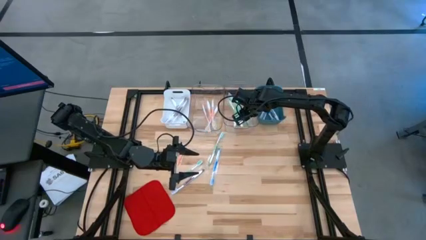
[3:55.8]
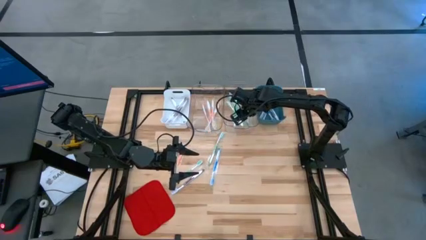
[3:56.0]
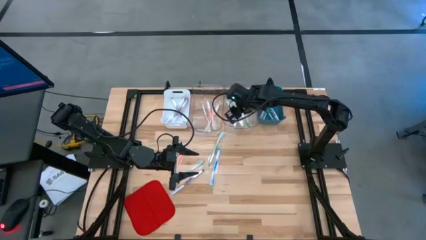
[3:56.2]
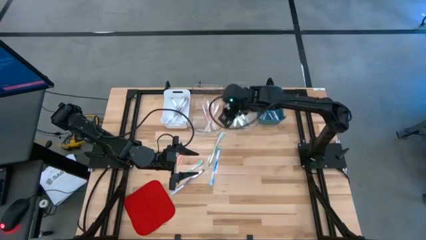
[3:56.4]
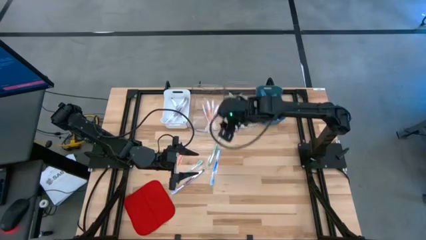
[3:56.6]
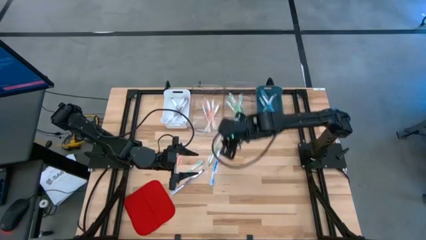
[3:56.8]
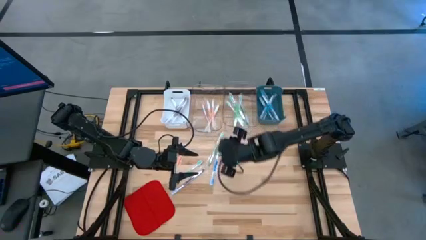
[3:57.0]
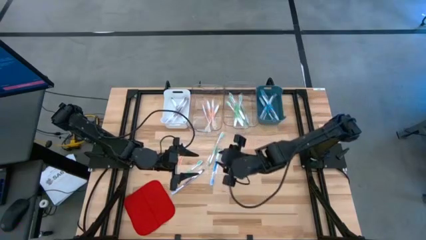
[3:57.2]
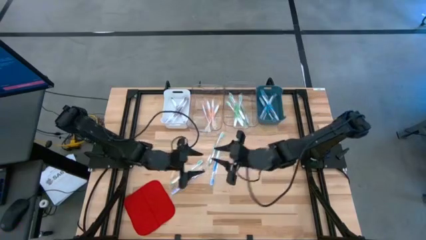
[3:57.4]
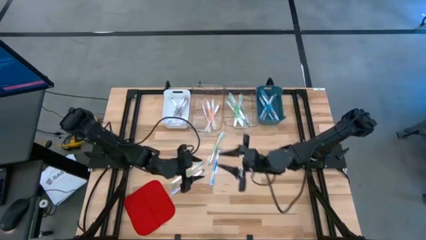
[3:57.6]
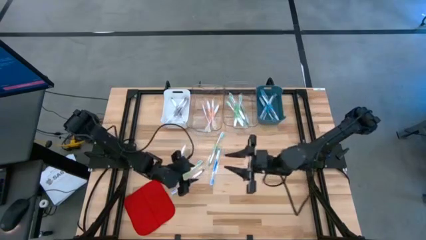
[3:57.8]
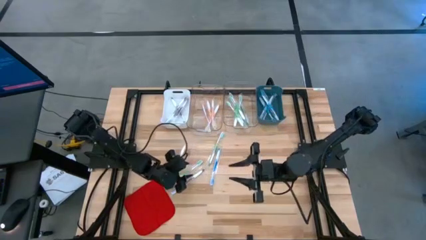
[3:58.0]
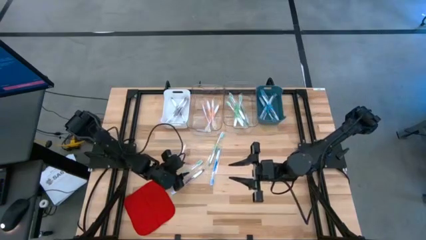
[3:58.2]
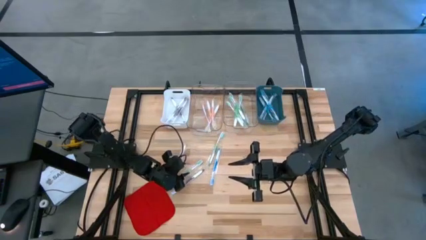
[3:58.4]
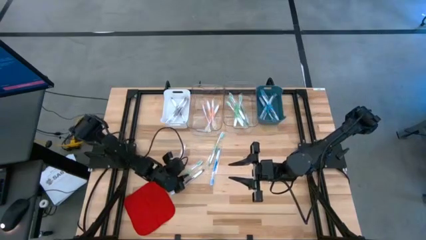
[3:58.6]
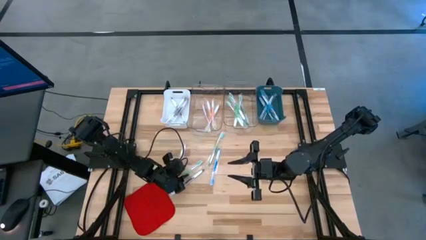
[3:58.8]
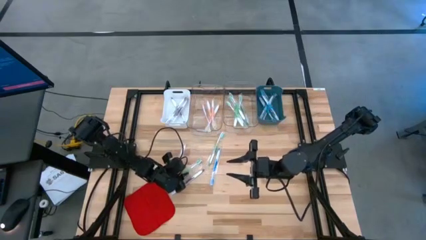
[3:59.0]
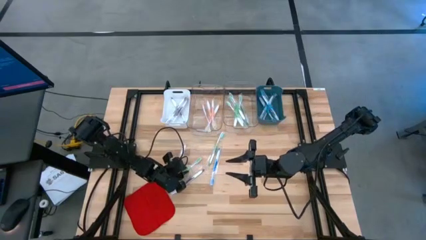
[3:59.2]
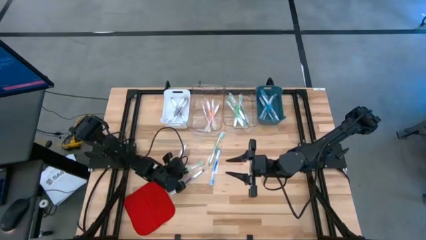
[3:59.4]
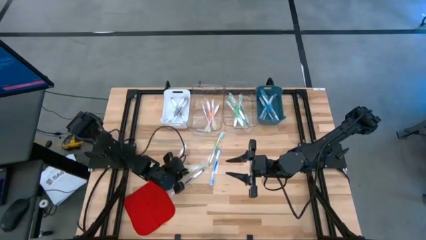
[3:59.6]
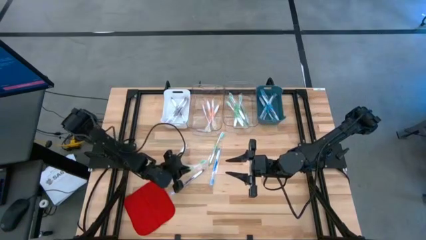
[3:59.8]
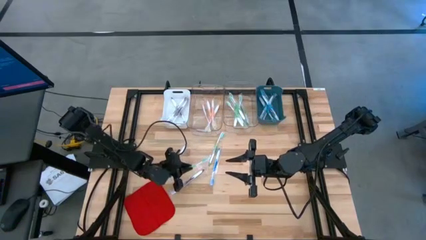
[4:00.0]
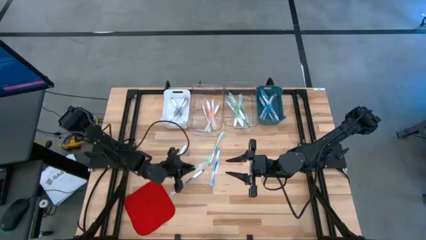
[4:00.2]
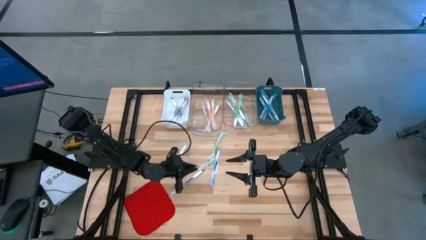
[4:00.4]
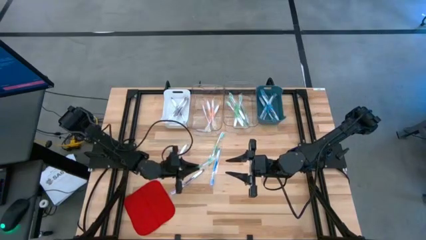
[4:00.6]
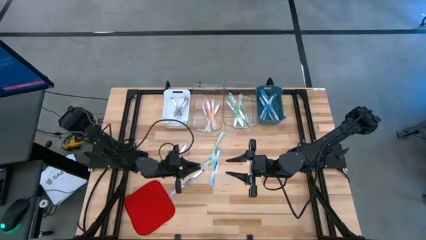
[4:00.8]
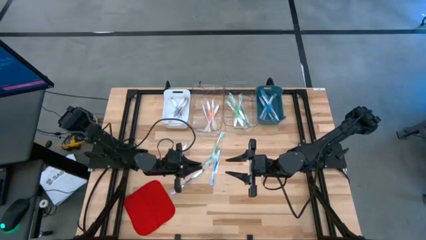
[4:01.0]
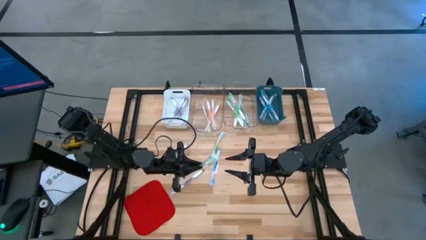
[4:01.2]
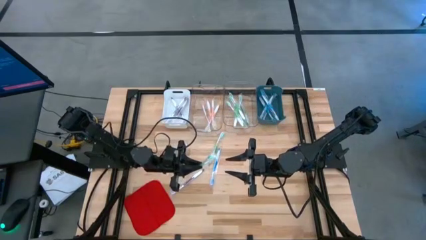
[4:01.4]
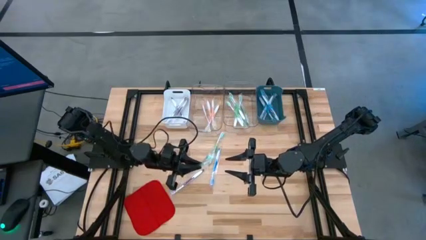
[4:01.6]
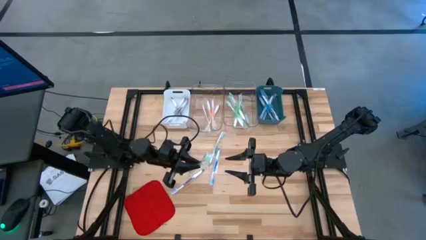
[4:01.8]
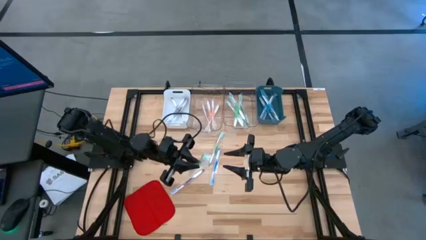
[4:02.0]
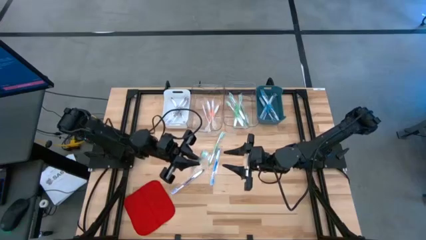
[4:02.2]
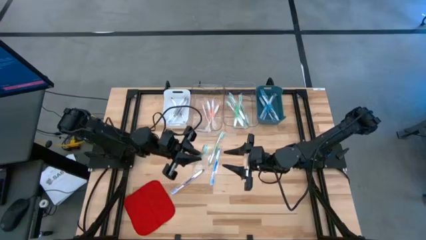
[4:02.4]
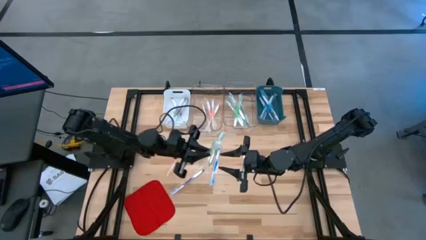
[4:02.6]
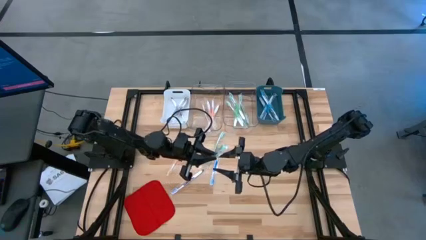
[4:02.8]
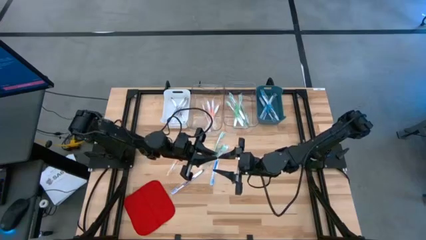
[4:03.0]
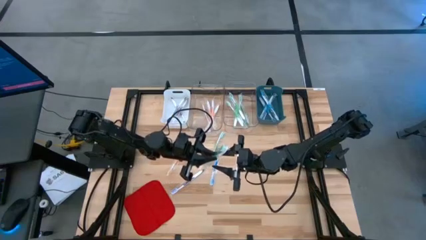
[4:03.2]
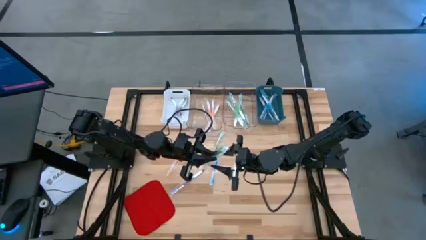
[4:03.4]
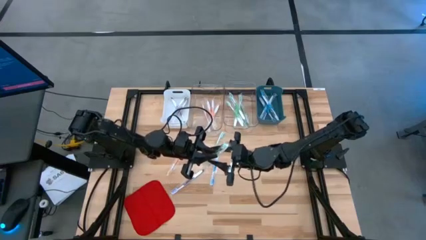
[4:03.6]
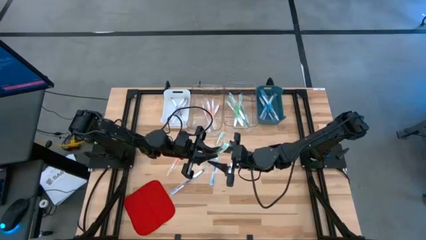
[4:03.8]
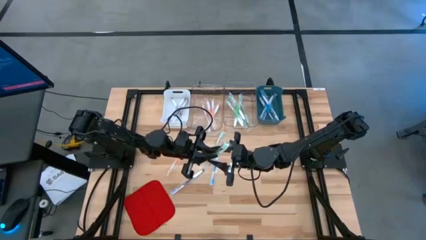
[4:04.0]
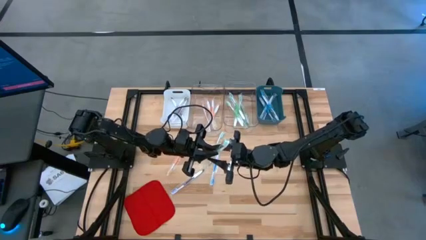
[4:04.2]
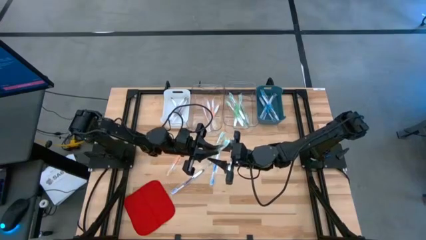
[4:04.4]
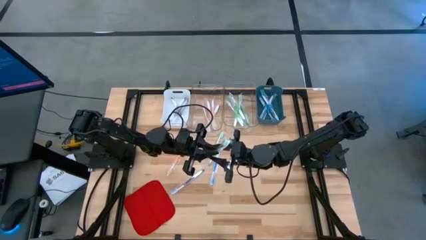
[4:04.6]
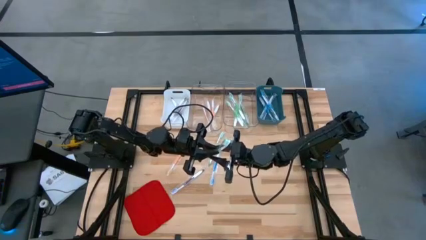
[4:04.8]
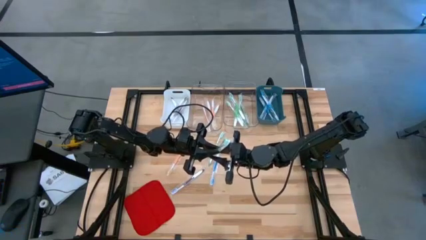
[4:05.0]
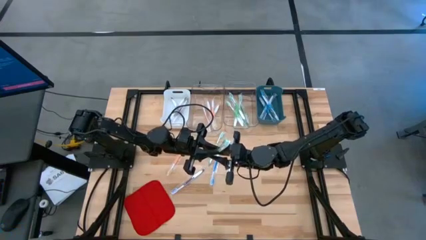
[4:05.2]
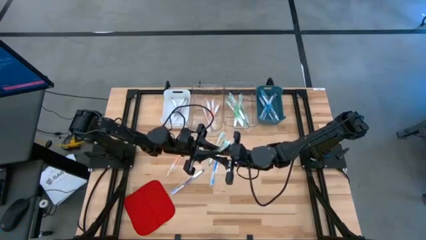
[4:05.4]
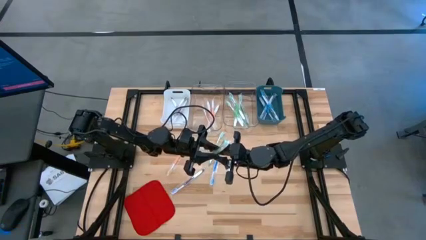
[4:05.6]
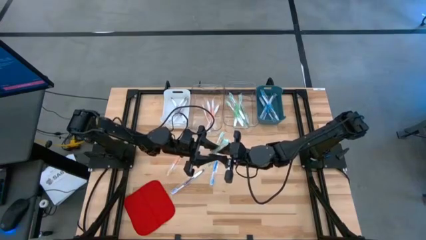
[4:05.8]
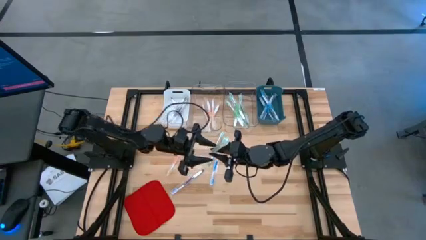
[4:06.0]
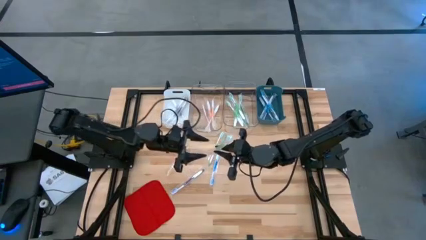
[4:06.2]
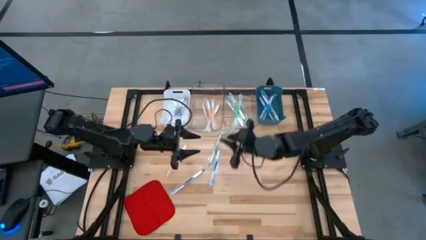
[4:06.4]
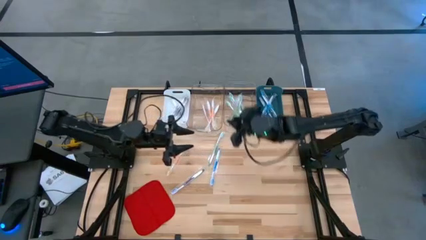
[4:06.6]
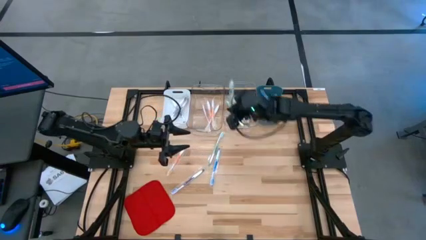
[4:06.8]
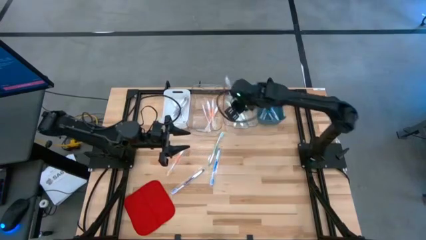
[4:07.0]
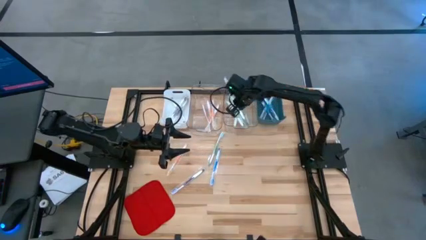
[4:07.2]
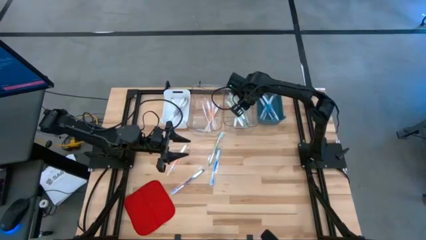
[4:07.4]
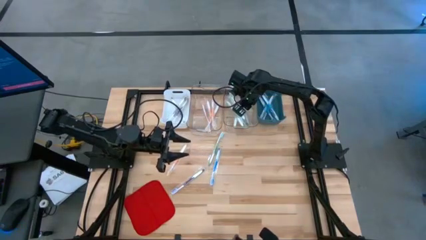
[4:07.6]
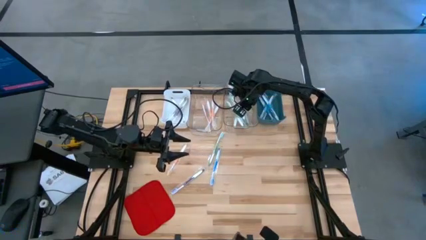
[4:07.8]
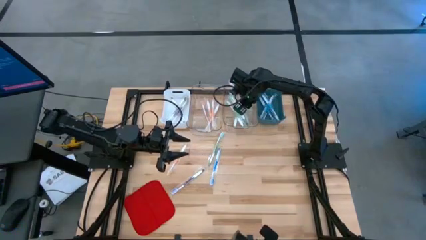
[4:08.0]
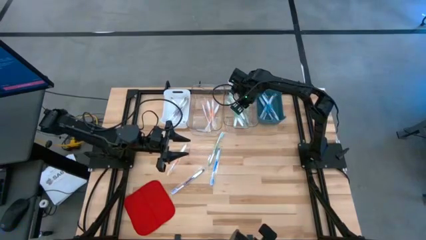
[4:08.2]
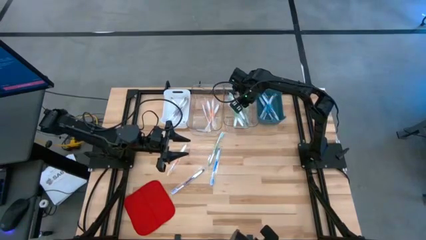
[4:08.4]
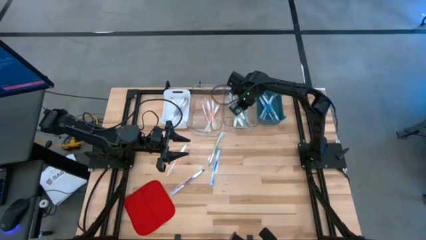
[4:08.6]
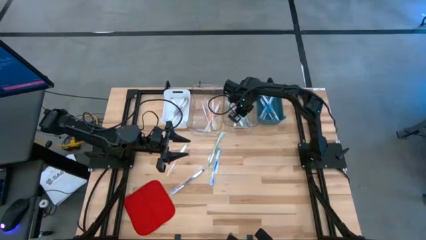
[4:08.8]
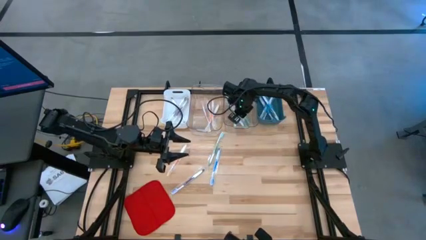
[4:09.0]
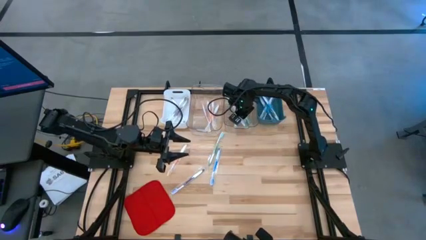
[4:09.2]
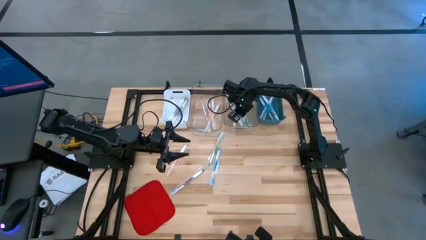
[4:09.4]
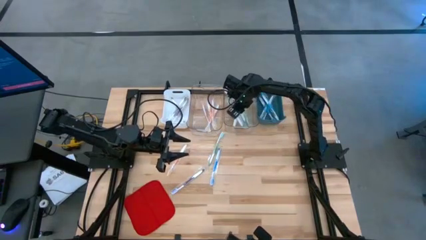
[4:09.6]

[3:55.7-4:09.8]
Task: Pick & Place Toothbrushes
Put the green toothbrush into the right transparent bin
